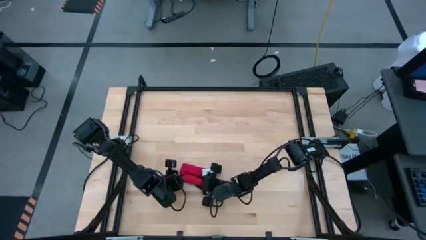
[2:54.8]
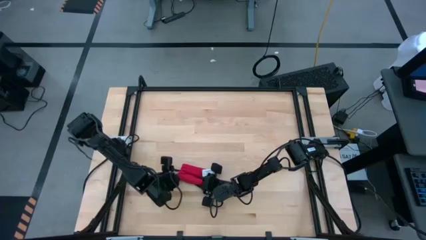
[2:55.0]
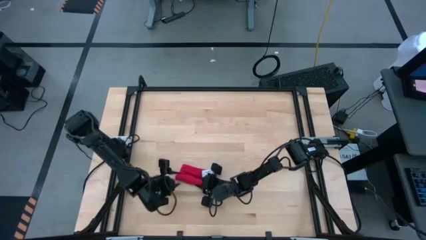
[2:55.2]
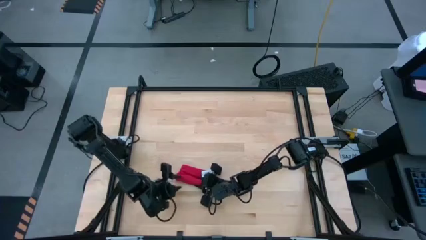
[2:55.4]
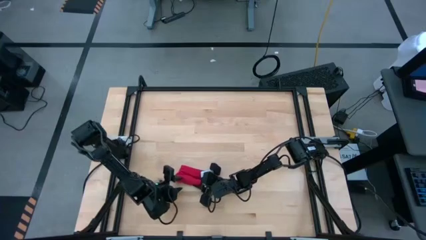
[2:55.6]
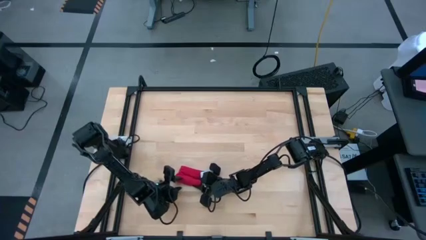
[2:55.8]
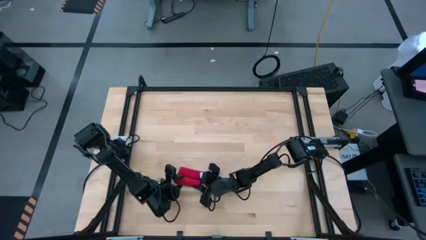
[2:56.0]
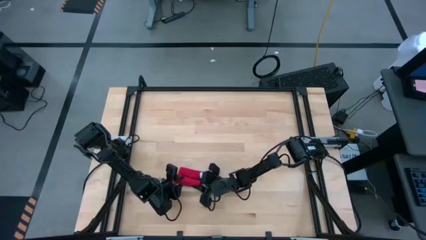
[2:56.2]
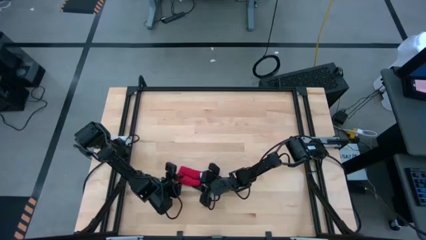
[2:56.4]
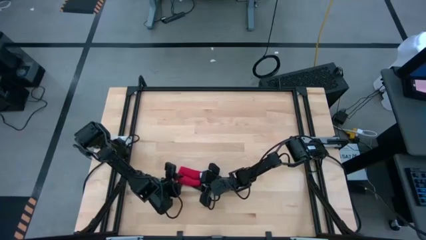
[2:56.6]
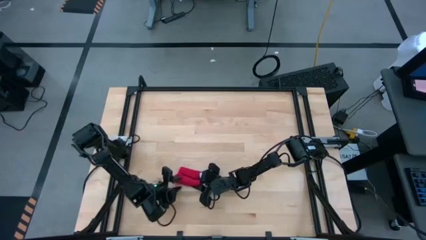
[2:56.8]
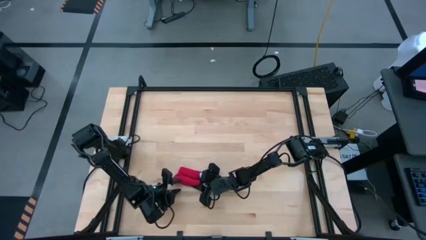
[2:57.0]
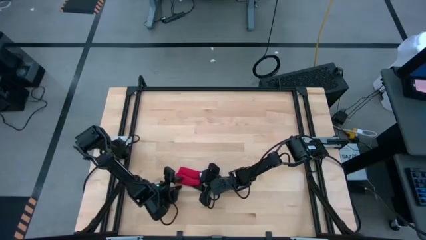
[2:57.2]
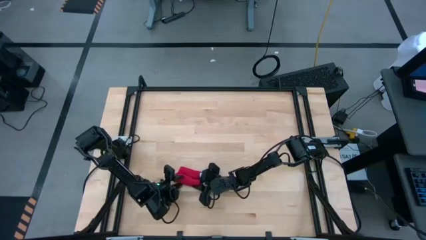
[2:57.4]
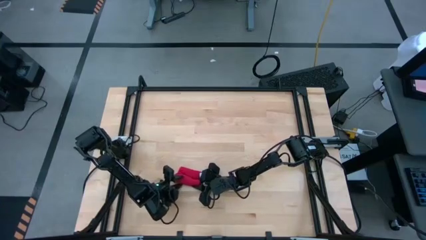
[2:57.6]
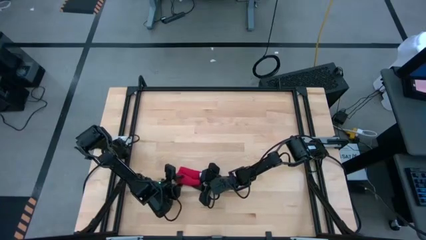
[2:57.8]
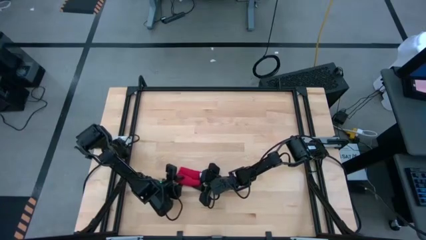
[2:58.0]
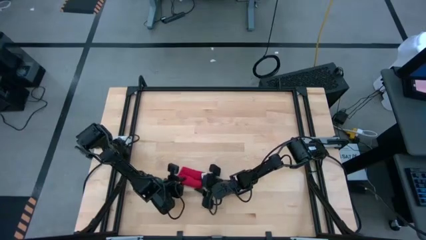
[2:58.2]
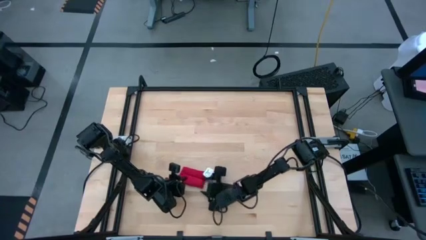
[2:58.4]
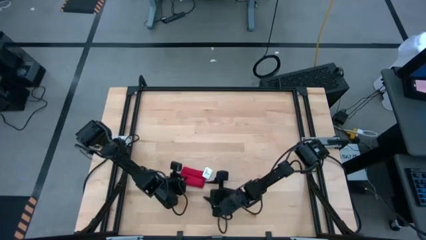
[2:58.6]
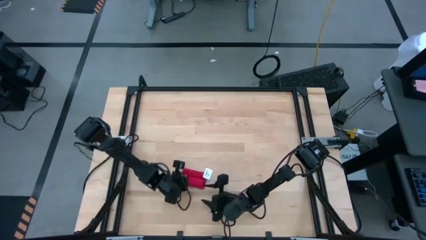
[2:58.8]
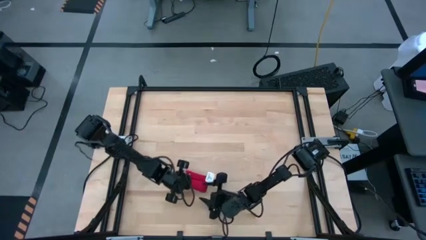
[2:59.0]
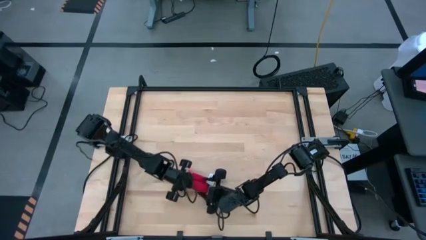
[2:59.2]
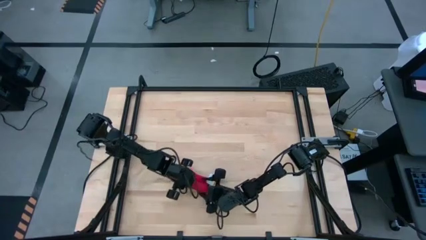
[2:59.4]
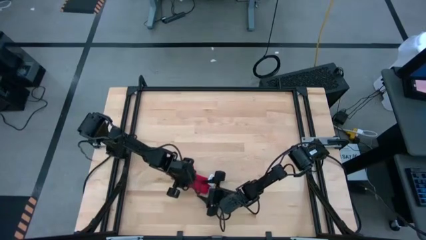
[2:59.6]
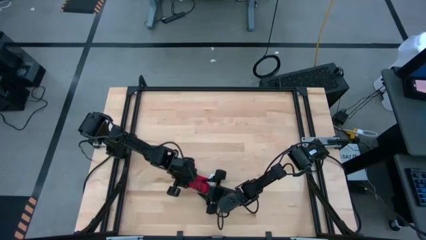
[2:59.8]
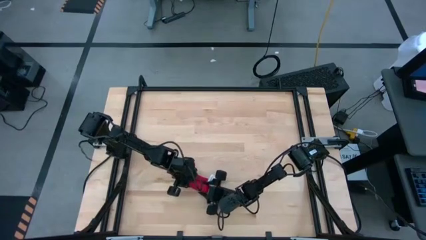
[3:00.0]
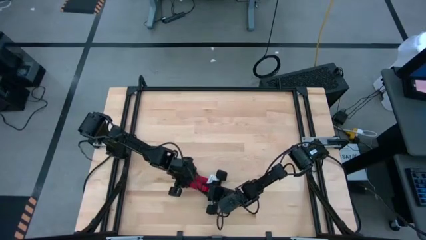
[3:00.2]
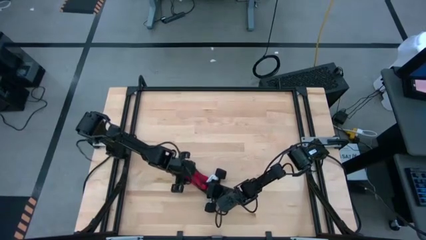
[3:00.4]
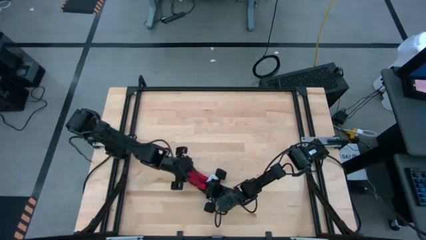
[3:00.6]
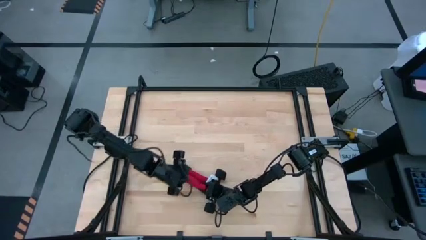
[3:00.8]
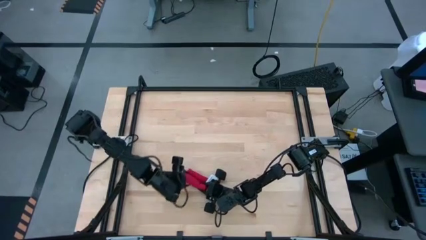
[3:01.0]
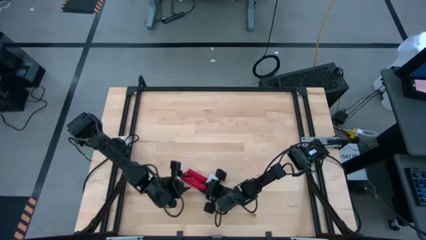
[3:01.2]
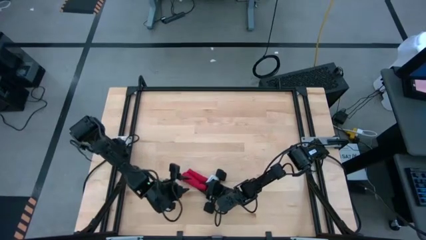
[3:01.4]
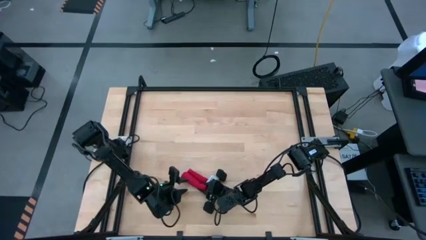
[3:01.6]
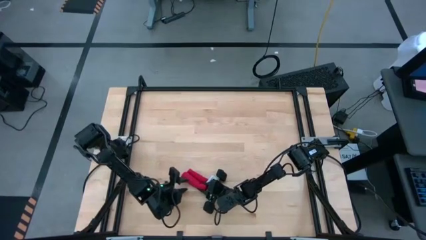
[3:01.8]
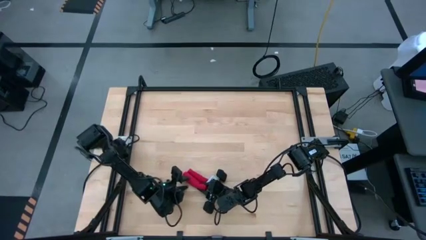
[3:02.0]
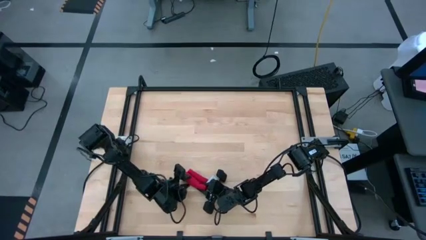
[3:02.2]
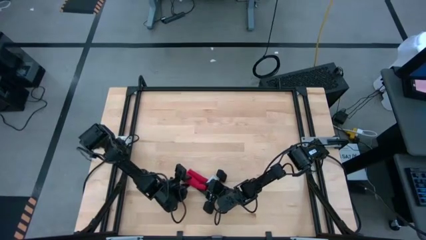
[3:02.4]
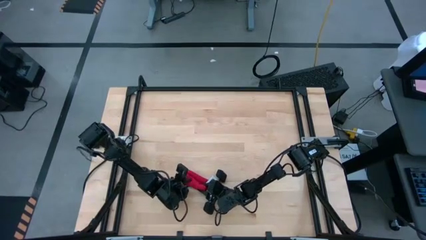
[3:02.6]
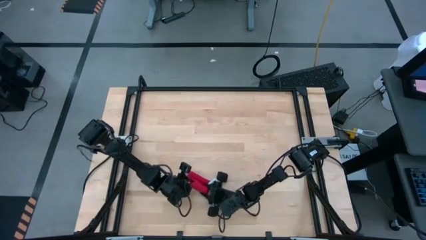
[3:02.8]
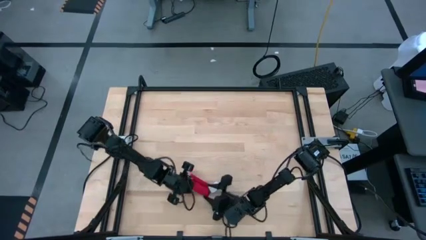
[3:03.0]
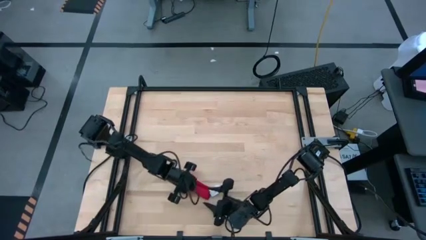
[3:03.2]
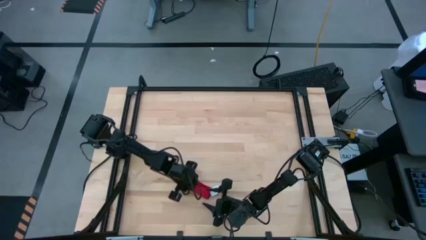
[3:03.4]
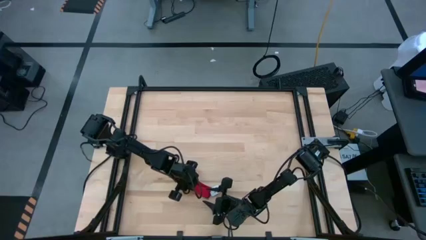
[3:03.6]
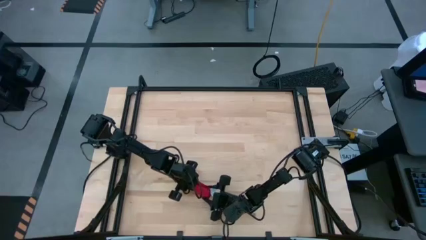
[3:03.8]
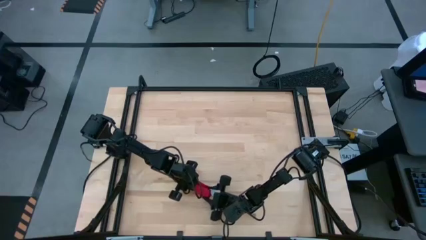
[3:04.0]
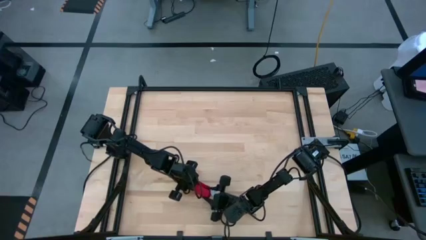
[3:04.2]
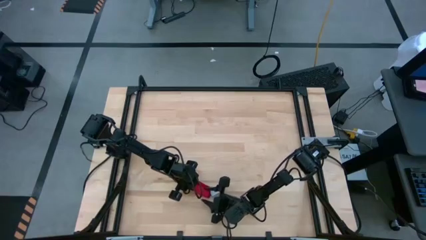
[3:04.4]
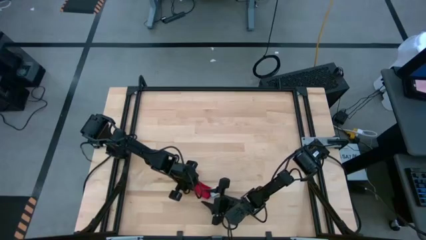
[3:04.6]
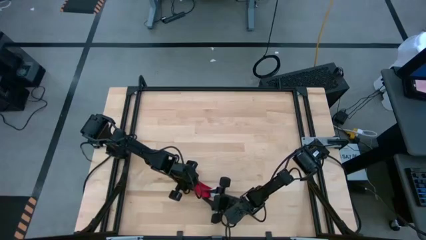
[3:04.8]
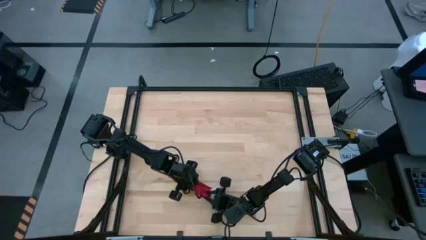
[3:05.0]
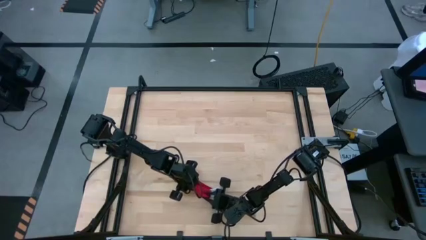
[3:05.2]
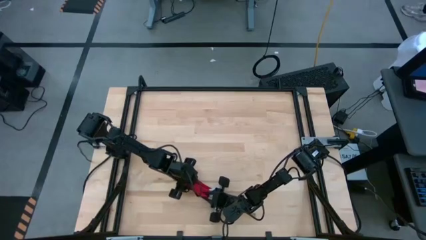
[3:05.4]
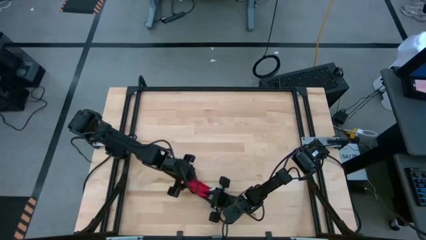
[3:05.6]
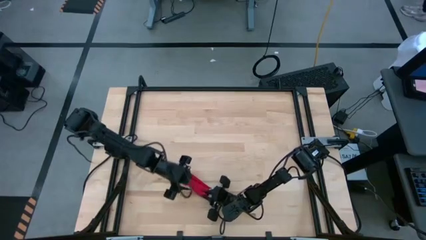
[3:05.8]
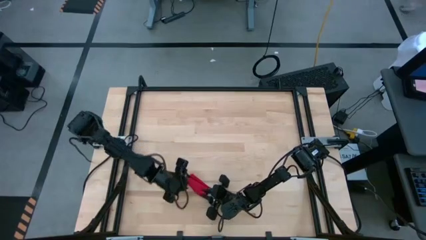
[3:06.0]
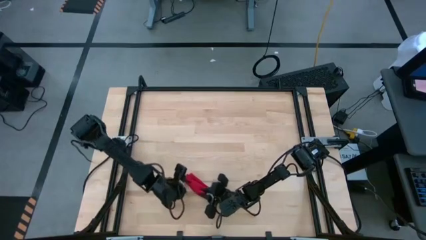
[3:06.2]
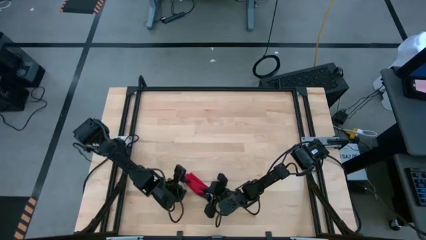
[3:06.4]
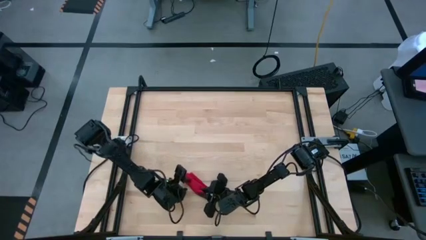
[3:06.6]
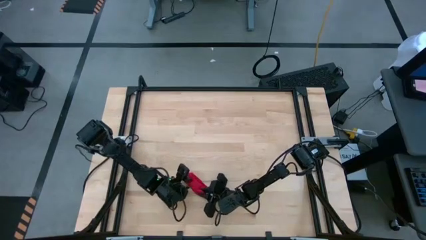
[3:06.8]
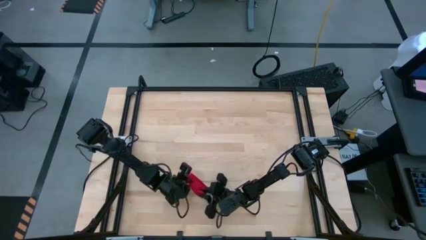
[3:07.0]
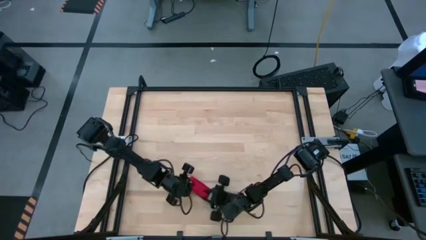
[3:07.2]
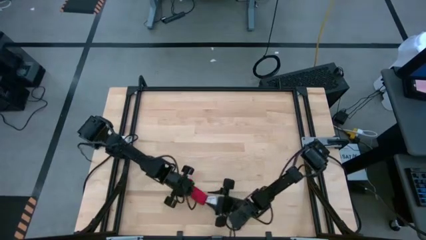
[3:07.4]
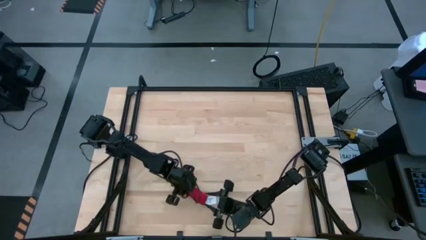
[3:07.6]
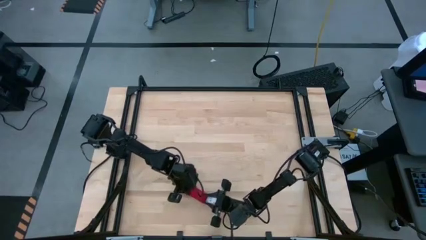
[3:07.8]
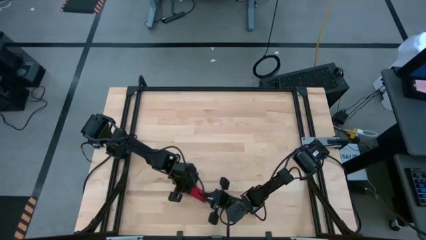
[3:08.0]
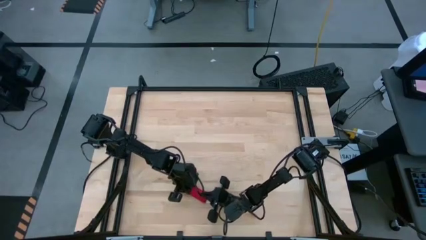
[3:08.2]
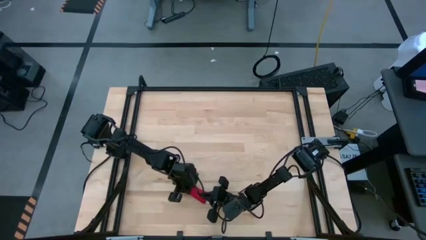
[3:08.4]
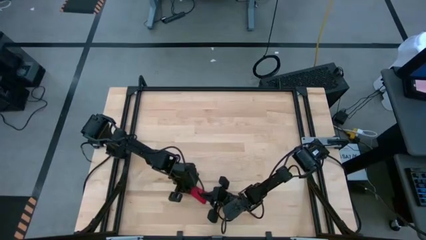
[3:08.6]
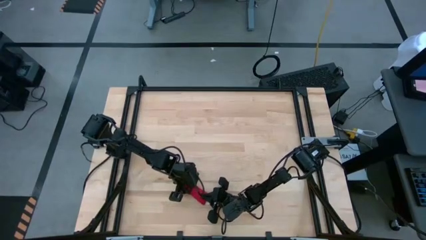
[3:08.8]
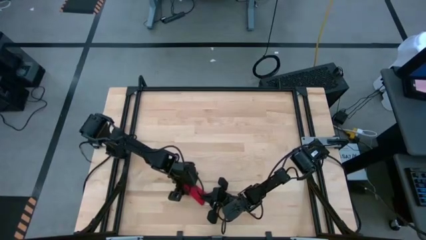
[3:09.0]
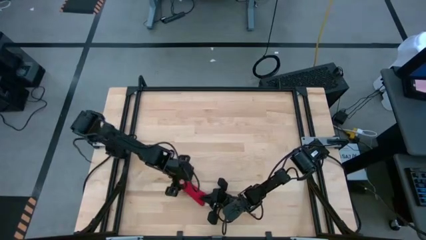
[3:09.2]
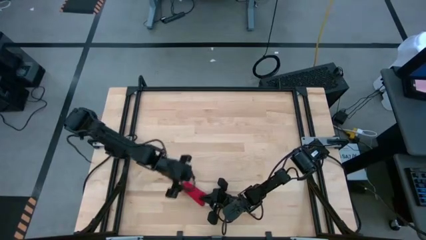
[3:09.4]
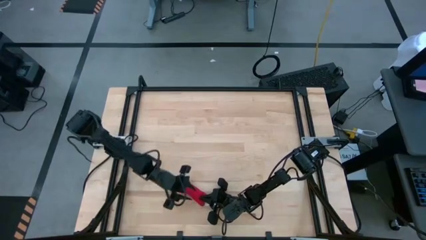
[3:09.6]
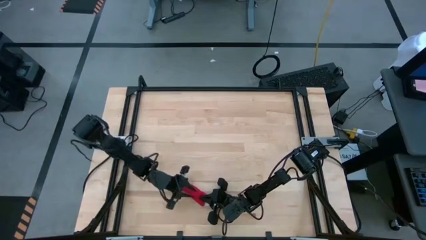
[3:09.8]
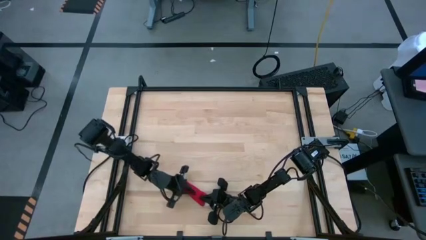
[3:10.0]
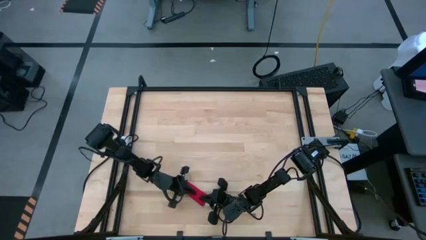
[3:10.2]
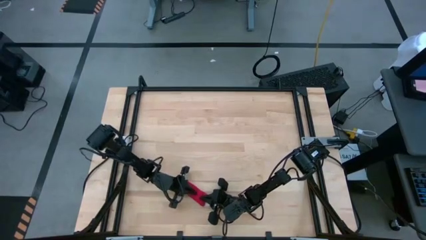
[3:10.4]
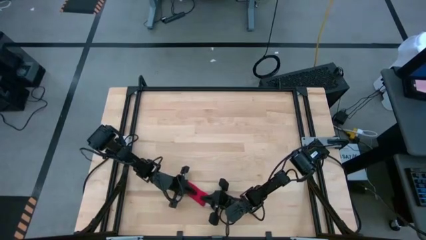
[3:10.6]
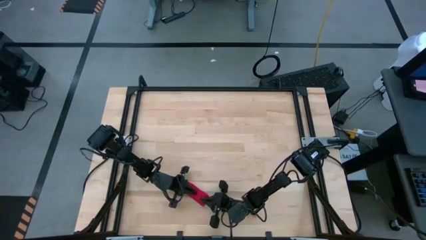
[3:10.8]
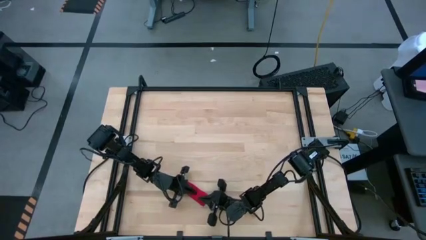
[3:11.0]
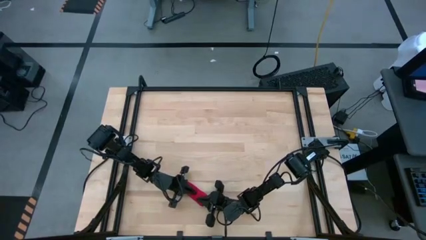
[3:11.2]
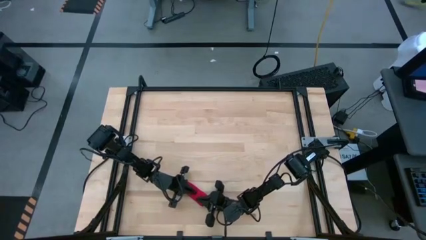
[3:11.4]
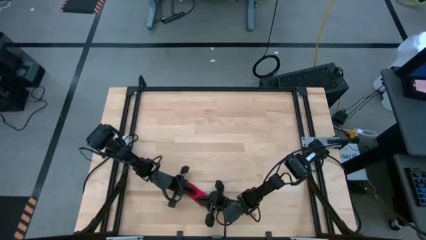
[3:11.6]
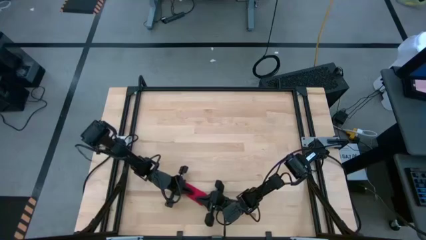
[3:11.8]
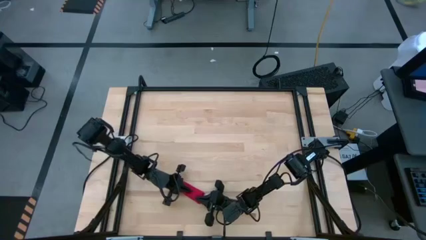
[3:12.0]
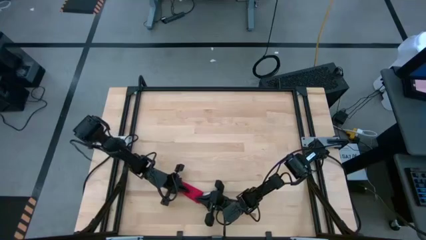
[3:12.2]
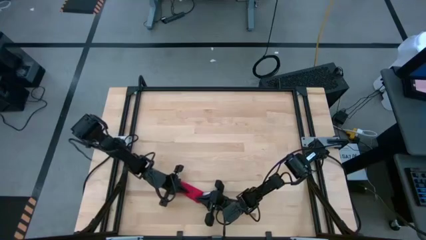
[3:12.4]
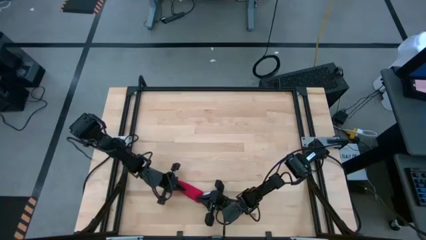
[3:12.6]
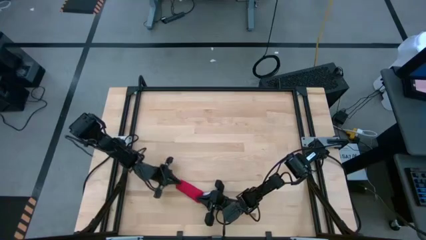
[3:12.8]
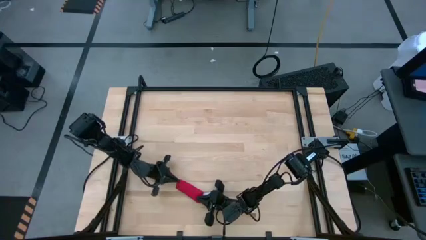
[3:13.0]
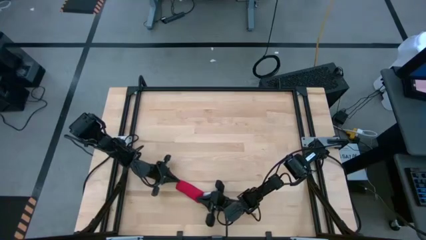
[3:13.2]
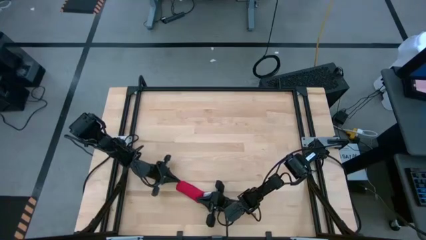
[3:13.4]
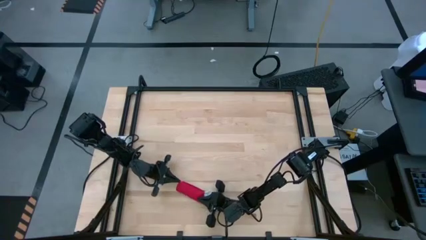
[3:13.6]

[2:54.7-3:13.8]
Task: Roll towel
Roll the red towel
